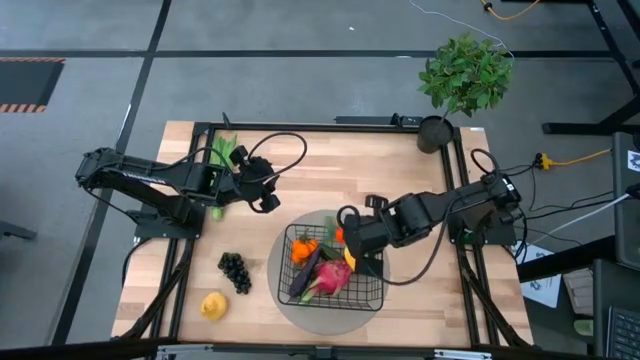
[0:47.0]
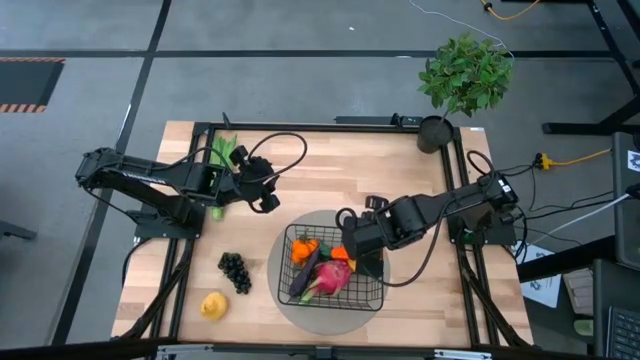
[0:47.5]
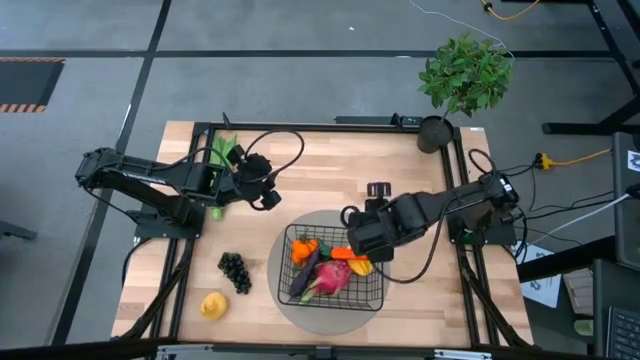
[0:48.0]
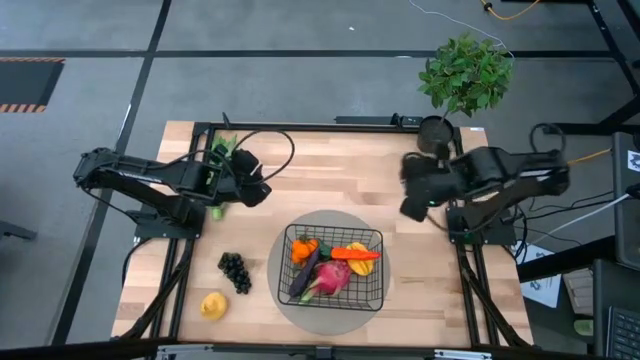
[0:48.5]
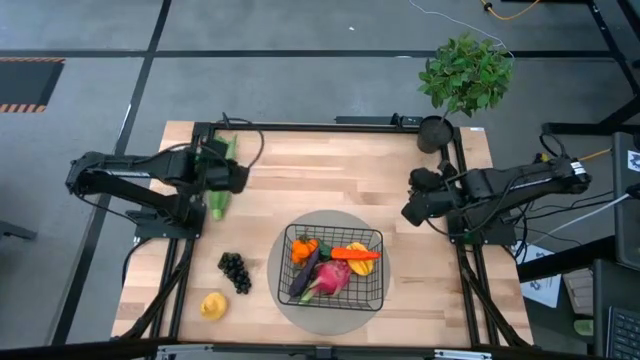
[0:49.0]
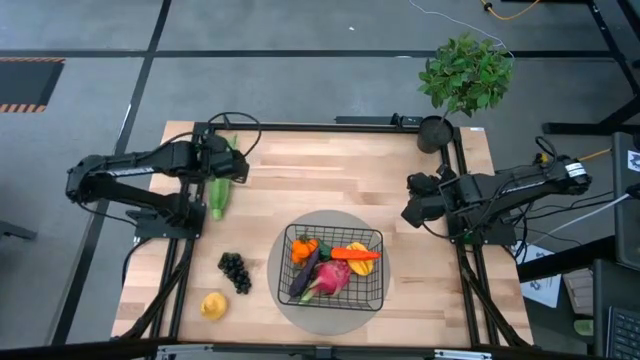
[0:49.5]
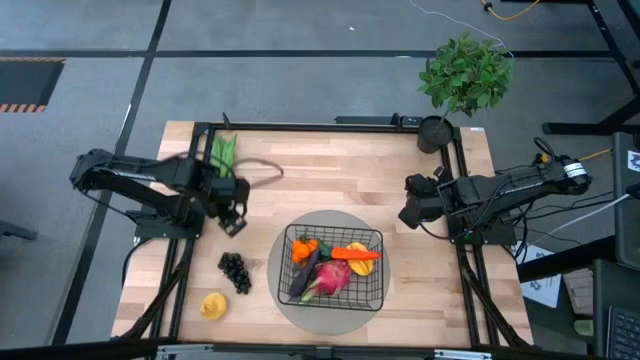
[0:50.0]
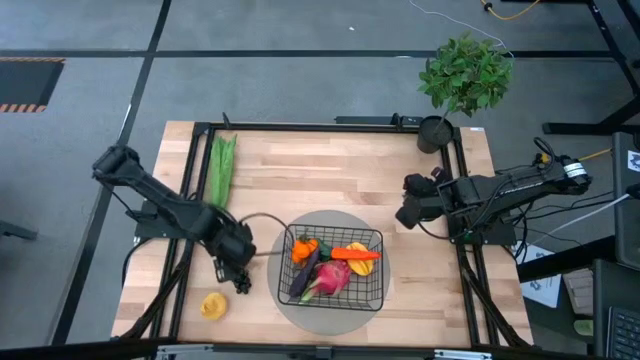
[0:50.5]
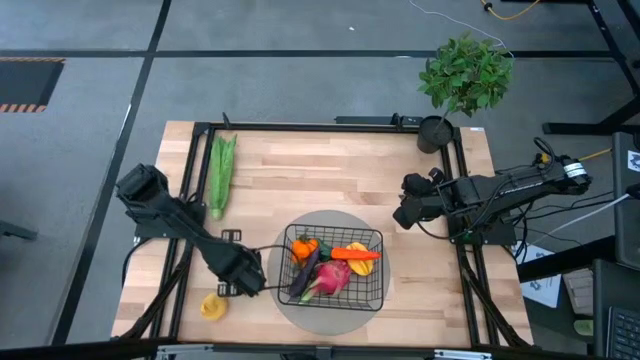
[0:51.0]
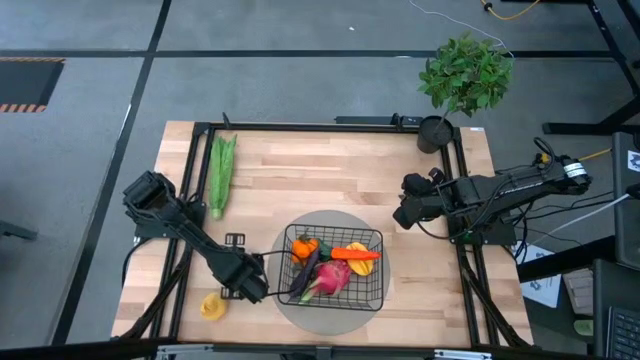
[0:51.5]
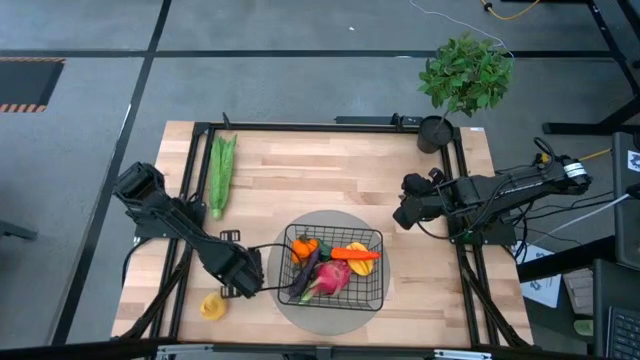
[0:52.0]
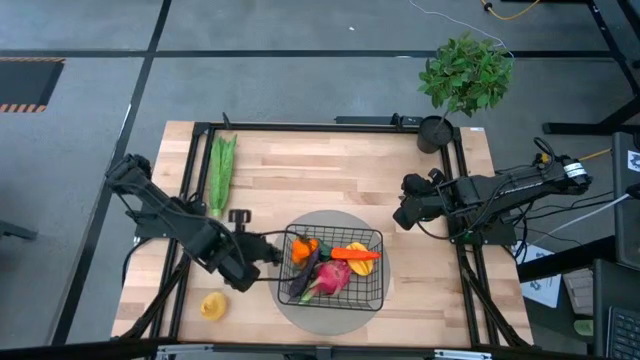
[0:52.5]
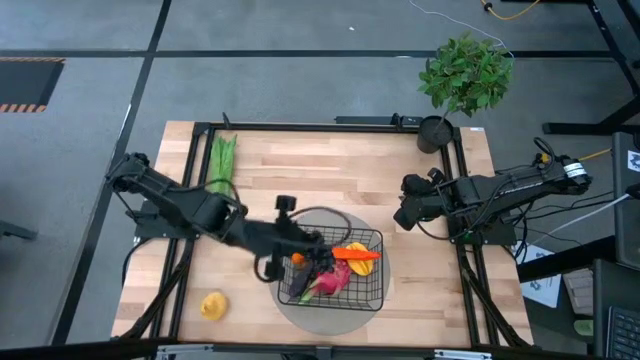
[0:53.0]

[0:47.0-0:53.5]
Task: Build produce basket
Put the violet grapes into the black wire basket

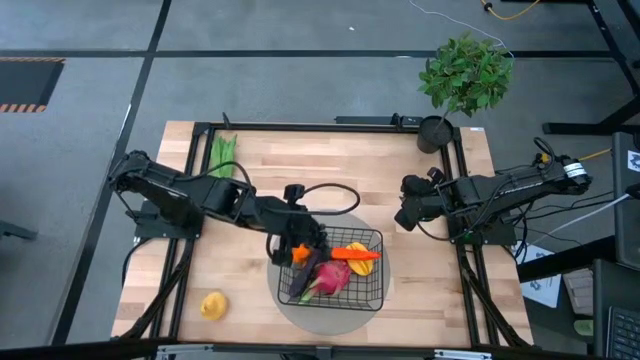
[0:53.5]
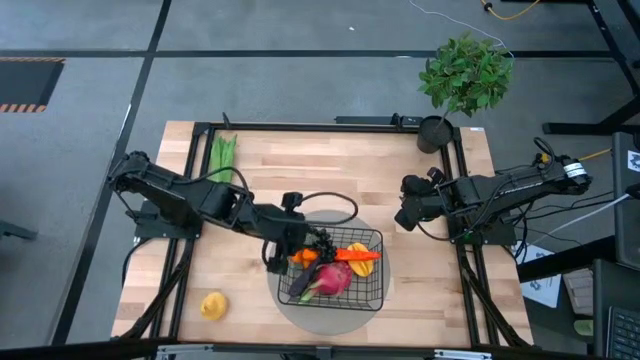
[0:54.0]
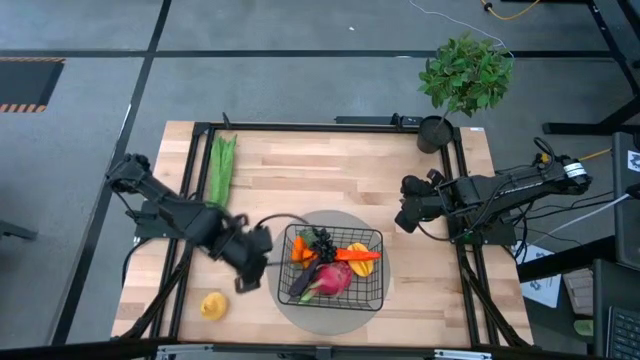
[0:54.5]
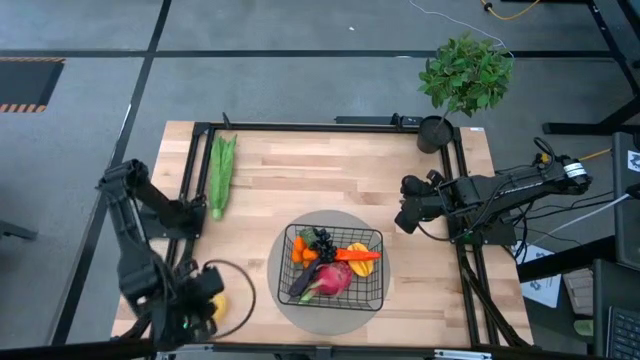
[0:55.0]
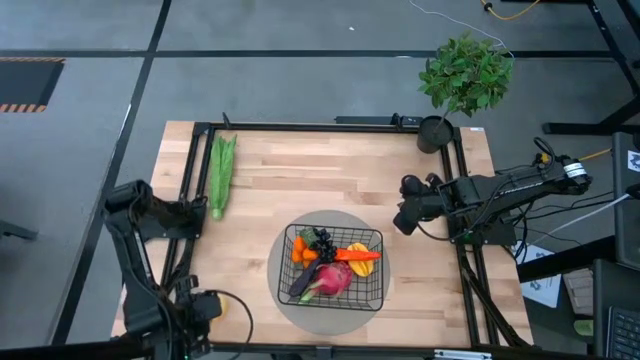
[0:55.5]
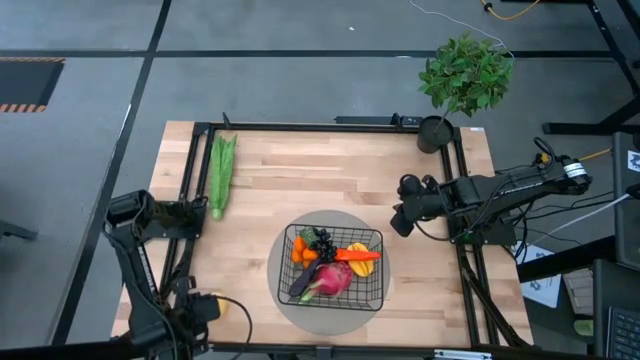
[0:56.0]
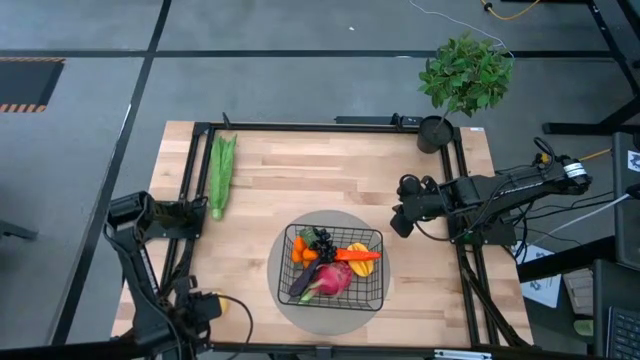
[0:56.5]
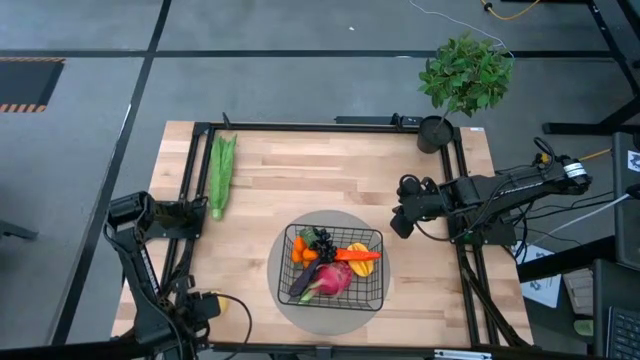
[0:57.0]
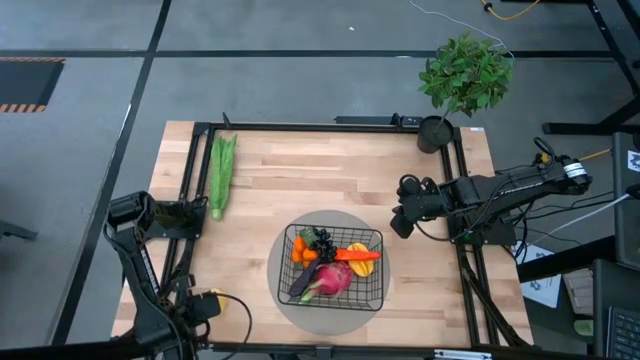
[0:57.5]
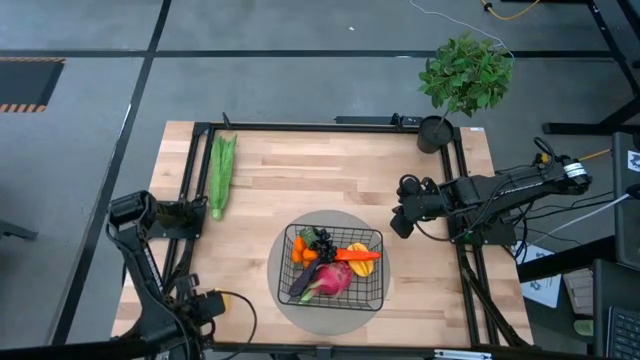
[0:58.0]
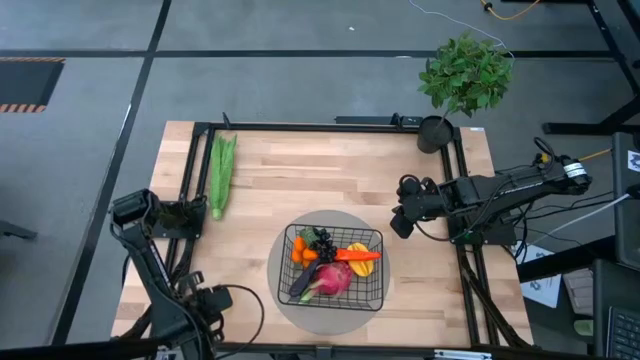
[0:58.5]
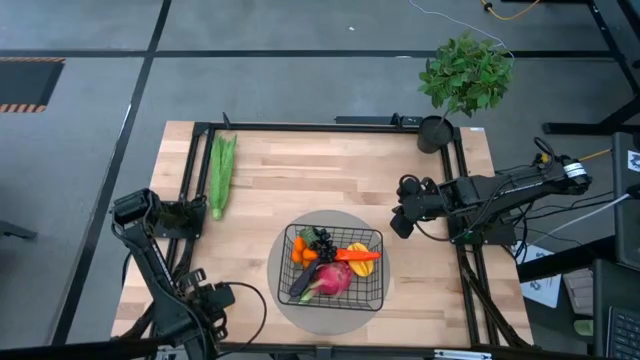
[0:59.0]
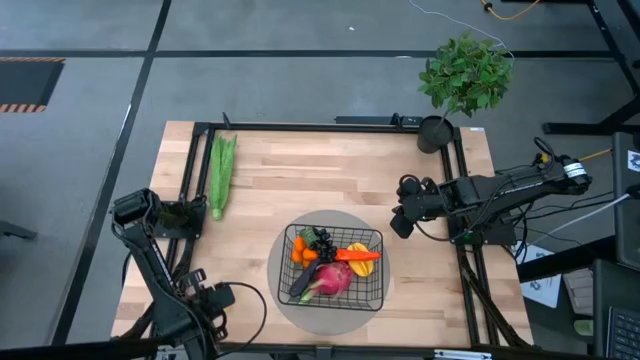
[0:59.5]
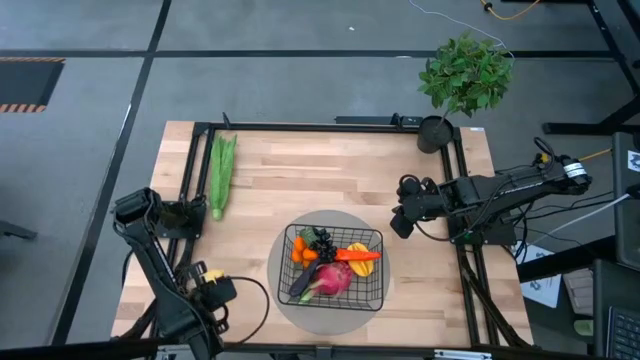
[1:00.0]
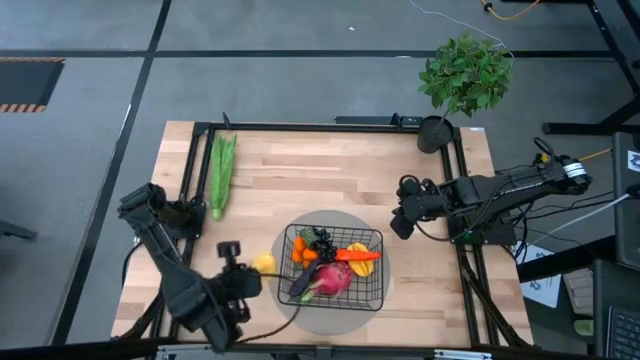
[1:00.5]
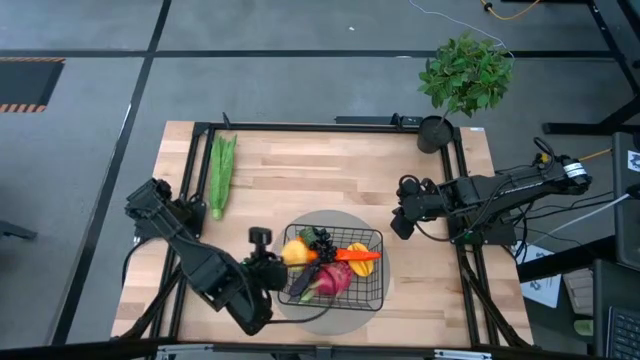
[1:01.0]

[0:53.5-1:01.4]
Put the yellow pear into the black wire basket

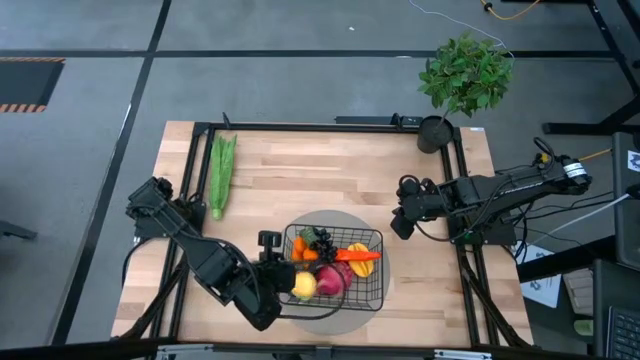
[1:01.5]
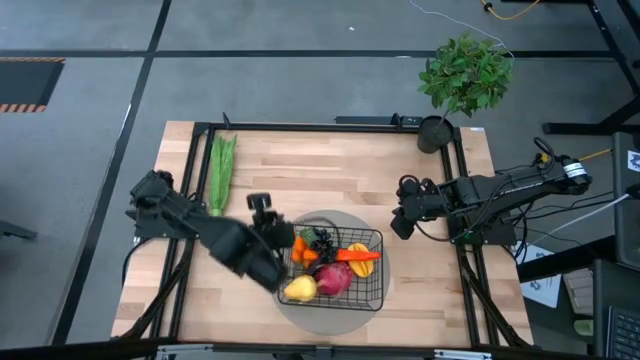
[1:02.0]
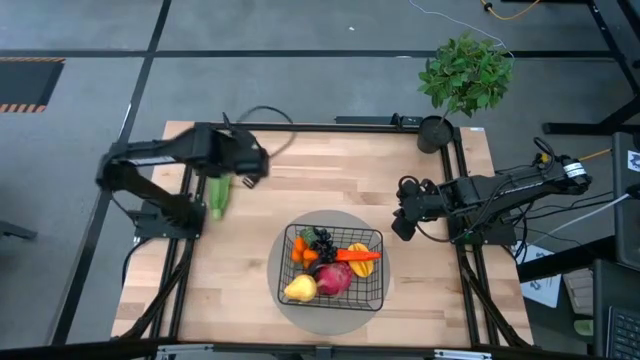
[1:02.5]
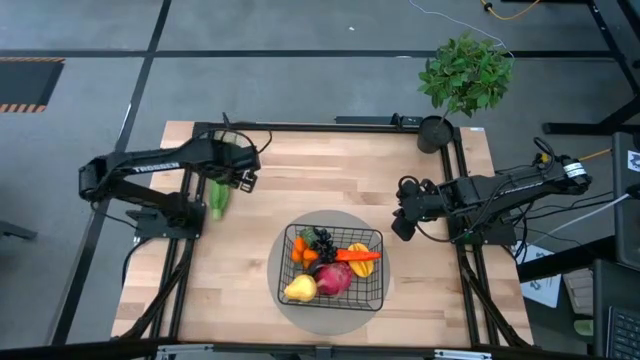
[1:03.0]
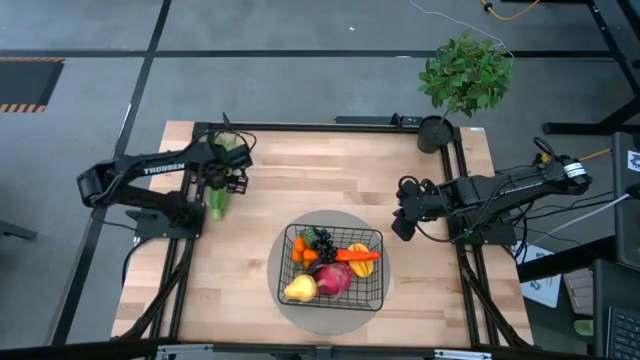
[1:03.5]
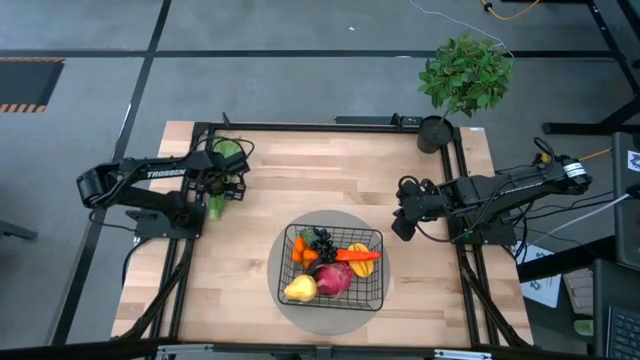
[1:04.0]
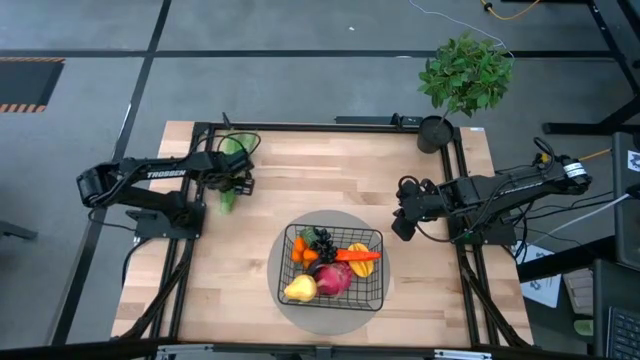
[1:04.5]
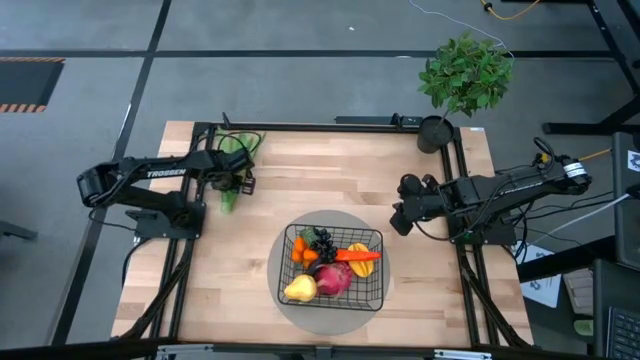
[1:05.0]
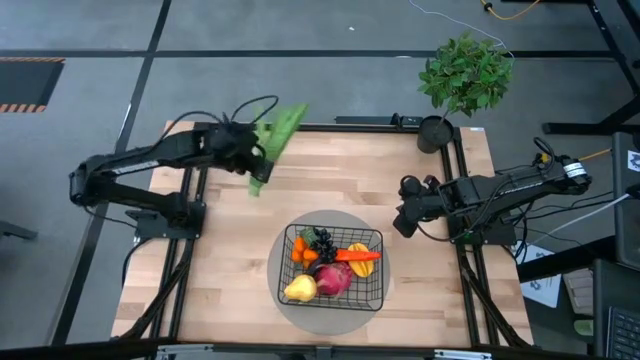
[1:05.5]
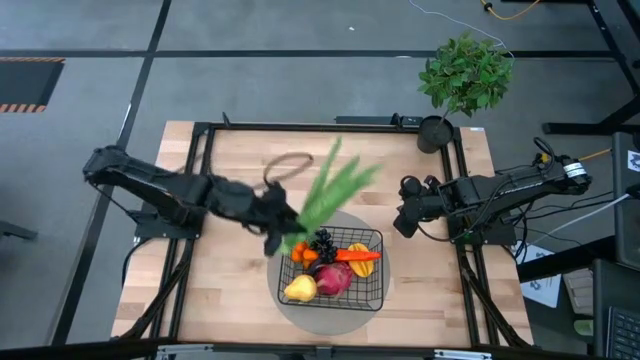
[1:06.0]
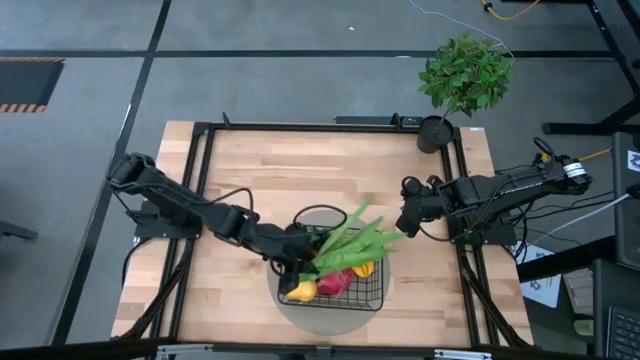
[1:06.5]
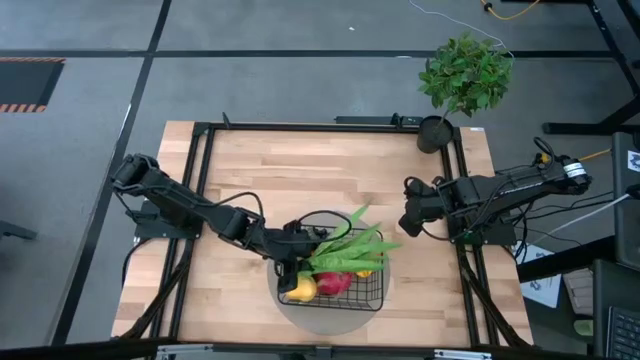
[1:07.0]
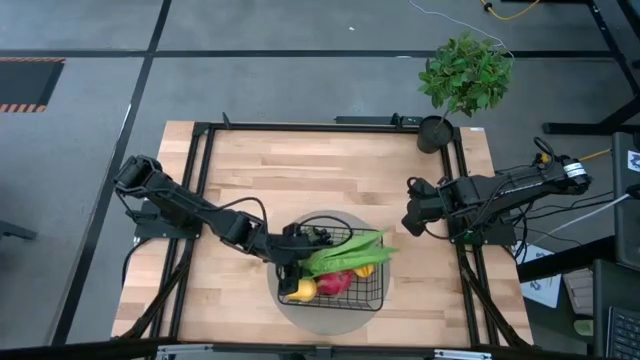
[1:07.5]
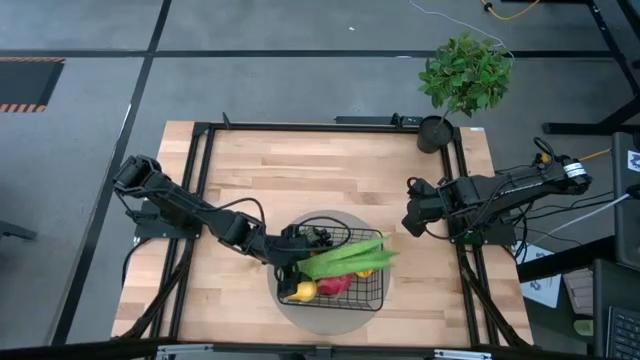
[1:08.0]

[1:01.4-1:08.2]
Put the green leafy lettuce into the black wire basket
